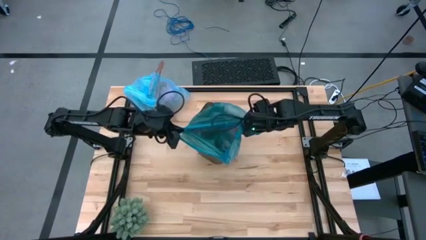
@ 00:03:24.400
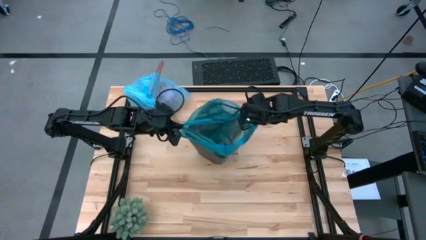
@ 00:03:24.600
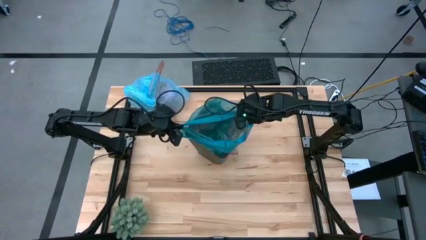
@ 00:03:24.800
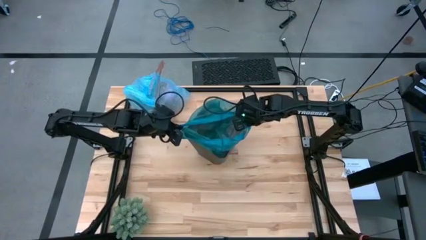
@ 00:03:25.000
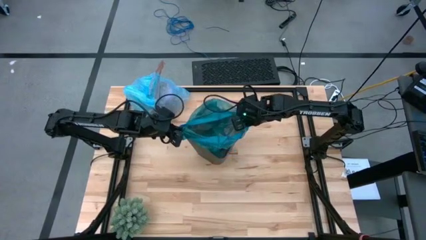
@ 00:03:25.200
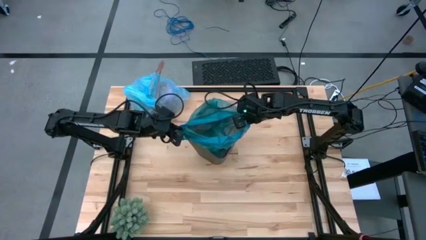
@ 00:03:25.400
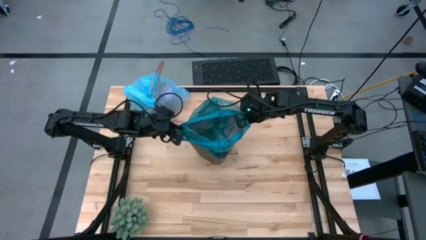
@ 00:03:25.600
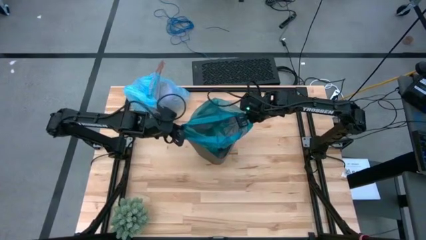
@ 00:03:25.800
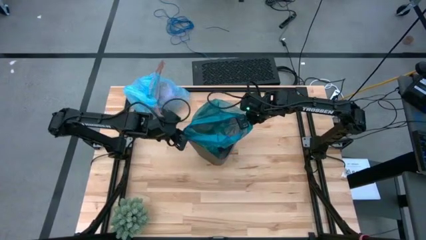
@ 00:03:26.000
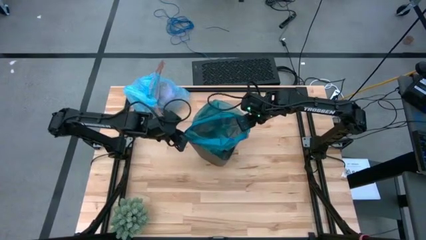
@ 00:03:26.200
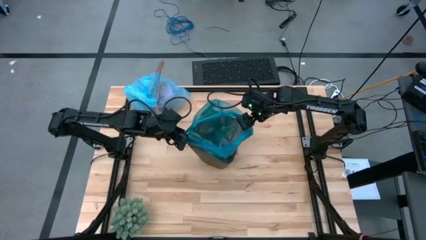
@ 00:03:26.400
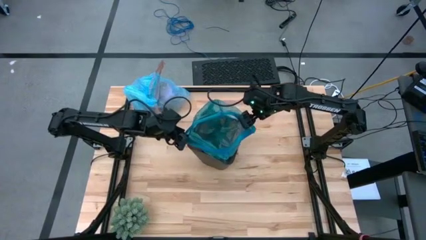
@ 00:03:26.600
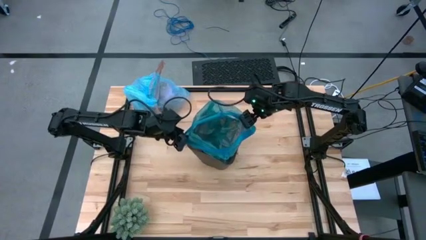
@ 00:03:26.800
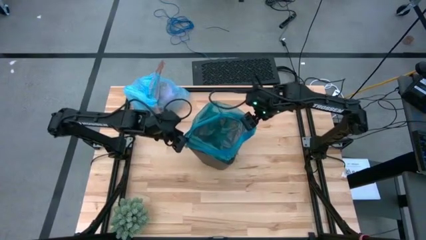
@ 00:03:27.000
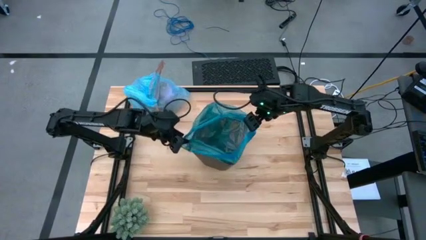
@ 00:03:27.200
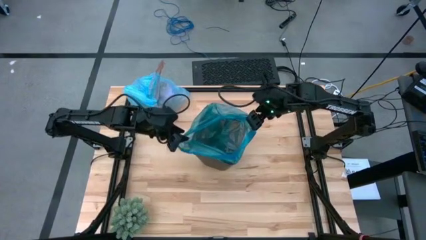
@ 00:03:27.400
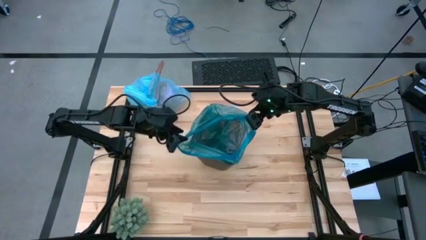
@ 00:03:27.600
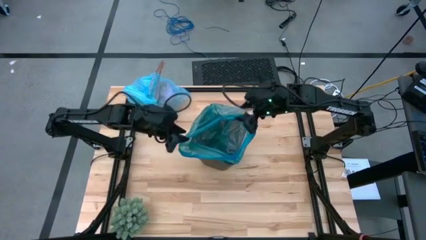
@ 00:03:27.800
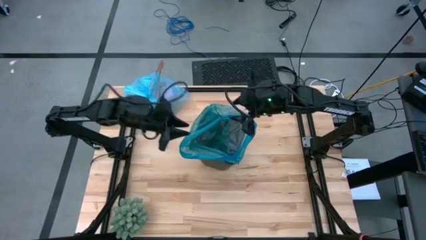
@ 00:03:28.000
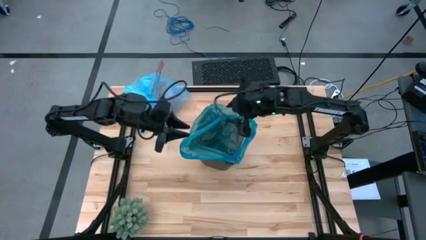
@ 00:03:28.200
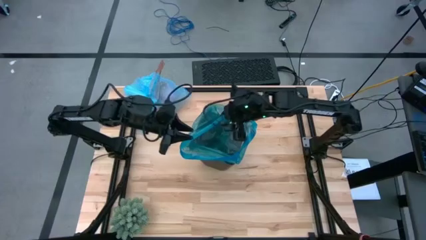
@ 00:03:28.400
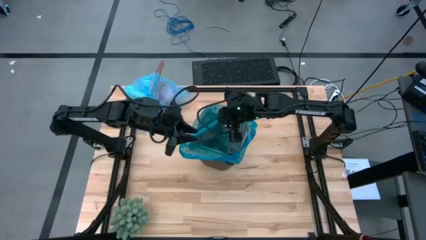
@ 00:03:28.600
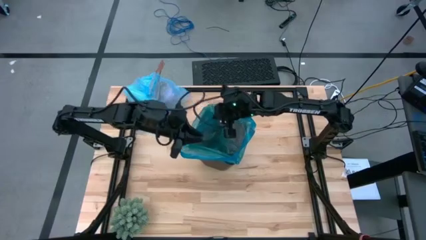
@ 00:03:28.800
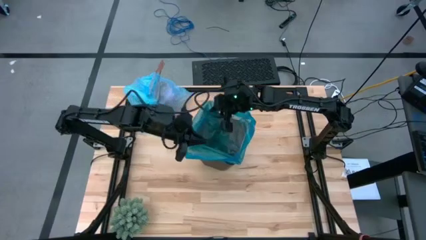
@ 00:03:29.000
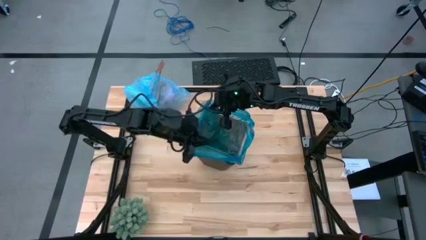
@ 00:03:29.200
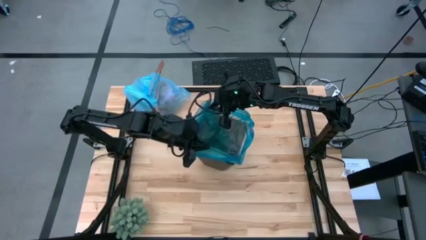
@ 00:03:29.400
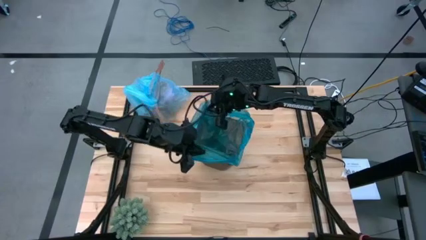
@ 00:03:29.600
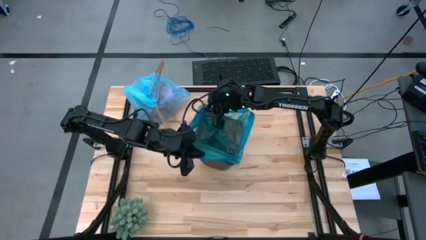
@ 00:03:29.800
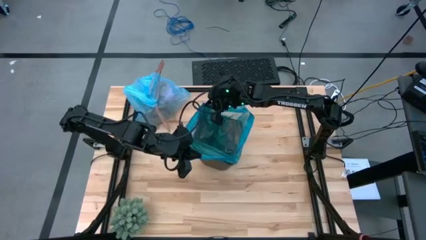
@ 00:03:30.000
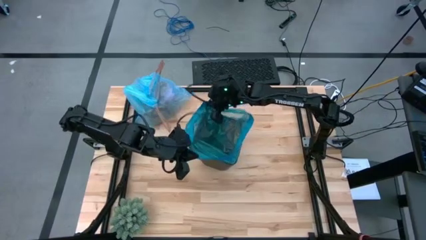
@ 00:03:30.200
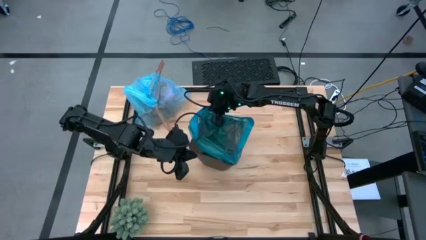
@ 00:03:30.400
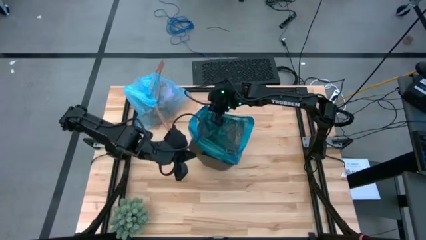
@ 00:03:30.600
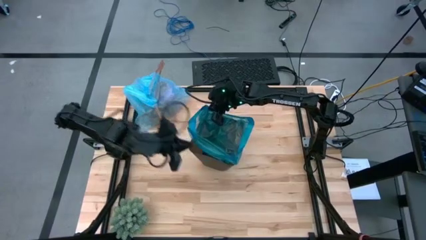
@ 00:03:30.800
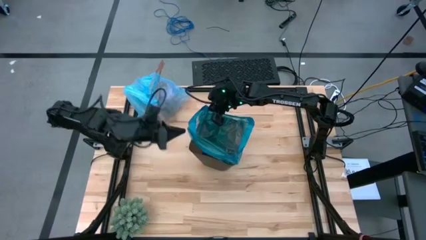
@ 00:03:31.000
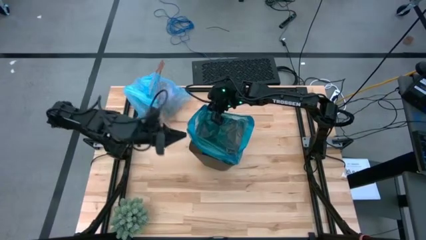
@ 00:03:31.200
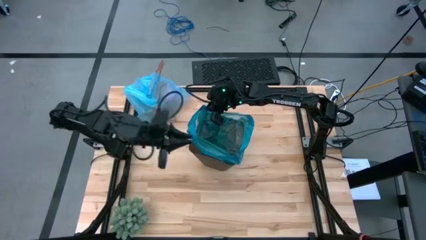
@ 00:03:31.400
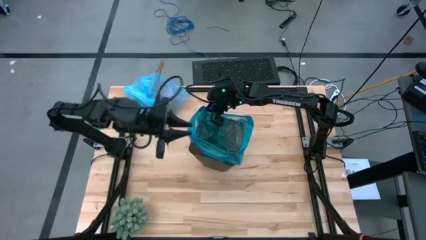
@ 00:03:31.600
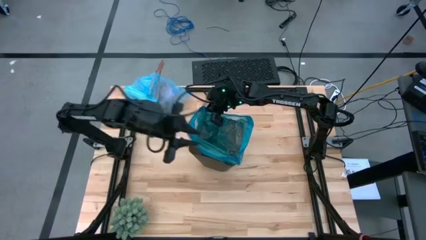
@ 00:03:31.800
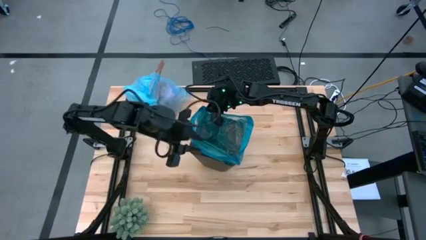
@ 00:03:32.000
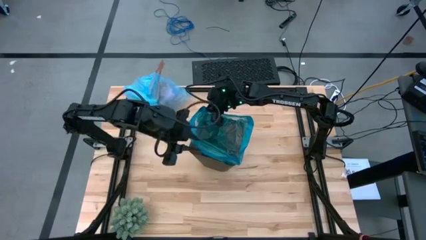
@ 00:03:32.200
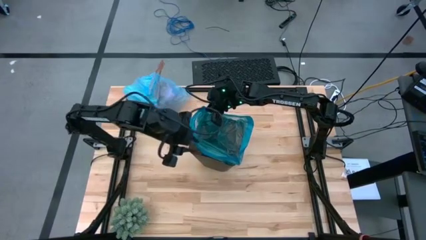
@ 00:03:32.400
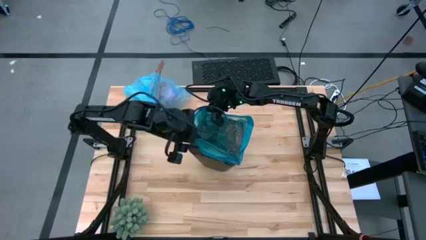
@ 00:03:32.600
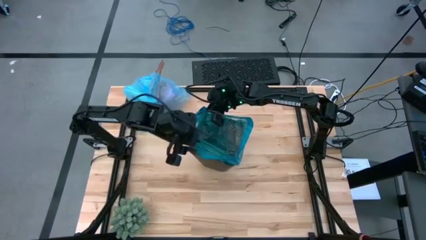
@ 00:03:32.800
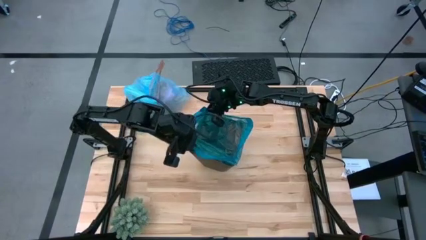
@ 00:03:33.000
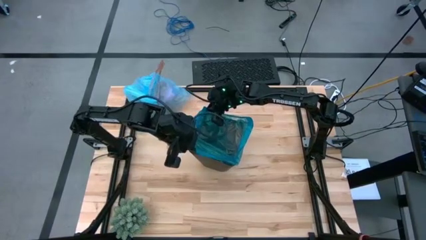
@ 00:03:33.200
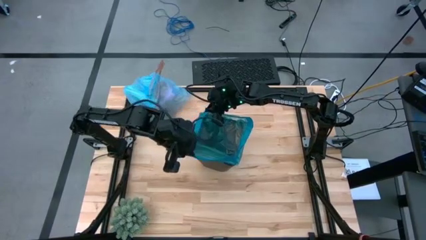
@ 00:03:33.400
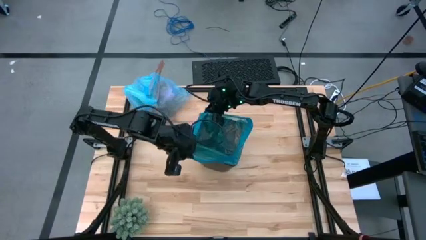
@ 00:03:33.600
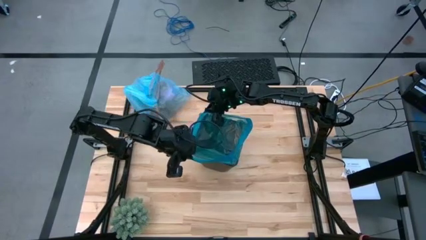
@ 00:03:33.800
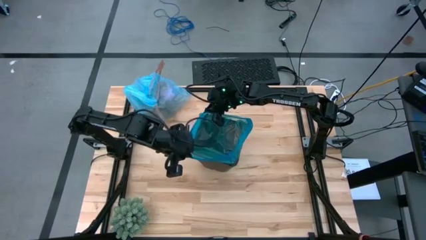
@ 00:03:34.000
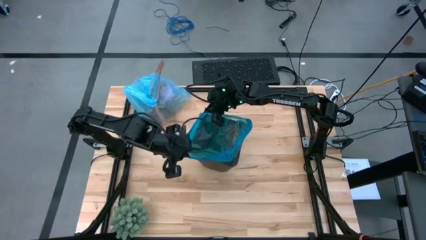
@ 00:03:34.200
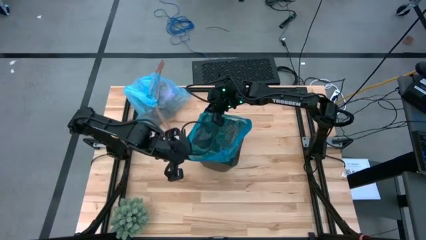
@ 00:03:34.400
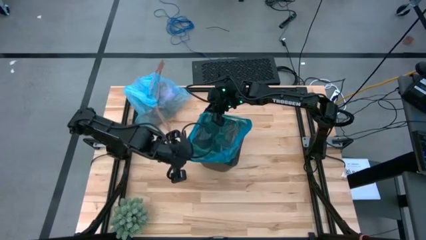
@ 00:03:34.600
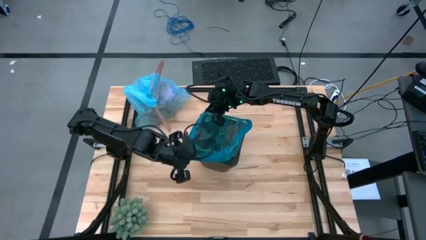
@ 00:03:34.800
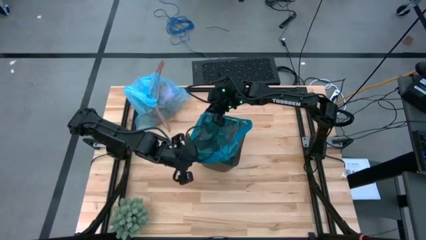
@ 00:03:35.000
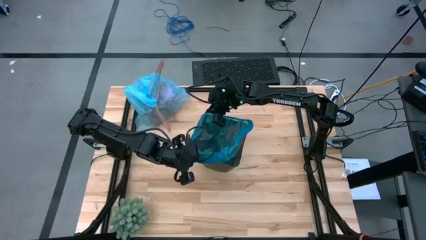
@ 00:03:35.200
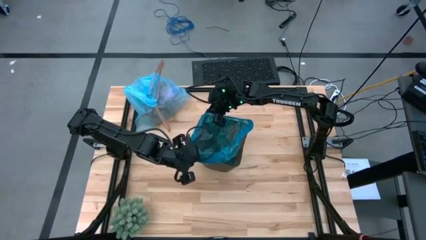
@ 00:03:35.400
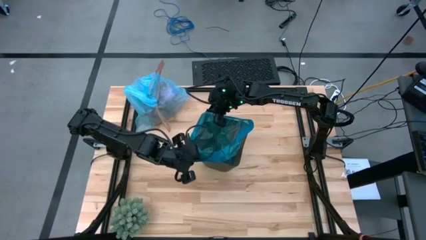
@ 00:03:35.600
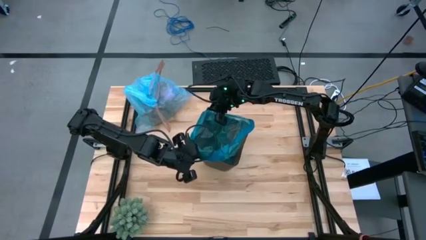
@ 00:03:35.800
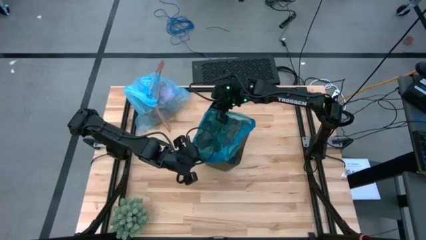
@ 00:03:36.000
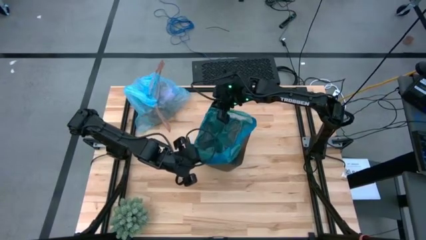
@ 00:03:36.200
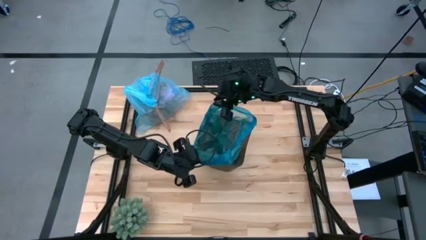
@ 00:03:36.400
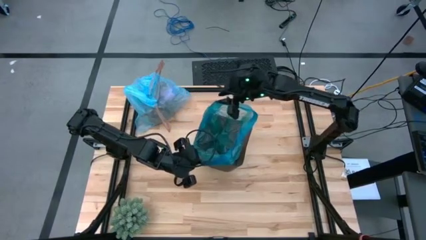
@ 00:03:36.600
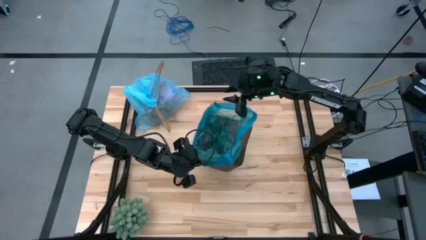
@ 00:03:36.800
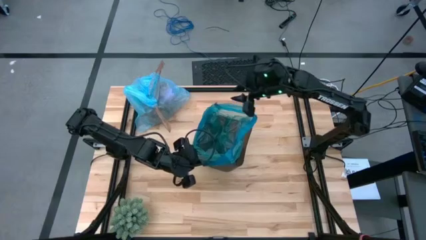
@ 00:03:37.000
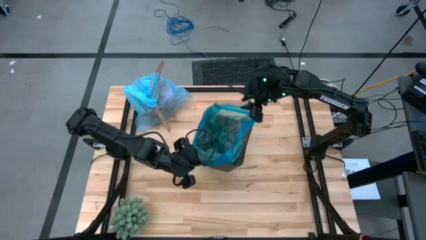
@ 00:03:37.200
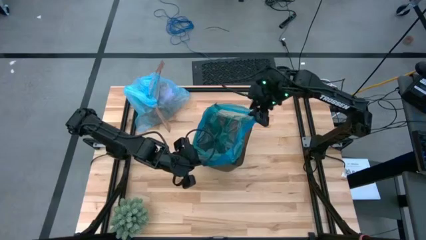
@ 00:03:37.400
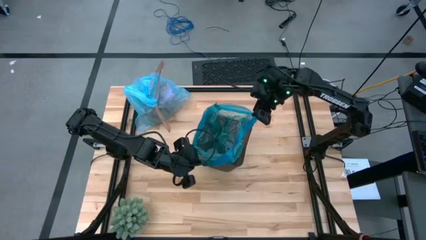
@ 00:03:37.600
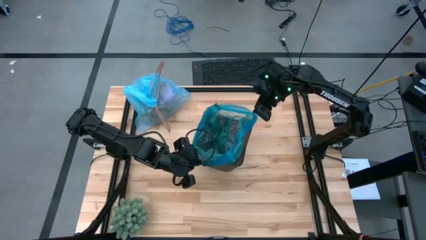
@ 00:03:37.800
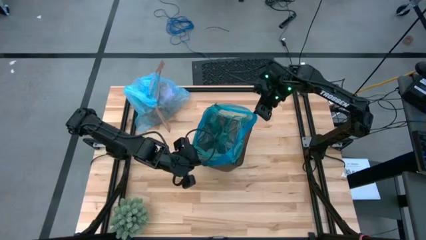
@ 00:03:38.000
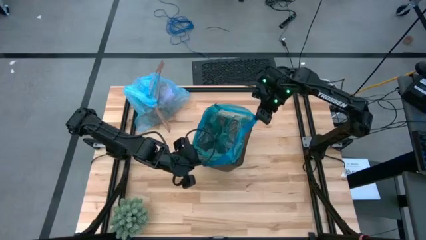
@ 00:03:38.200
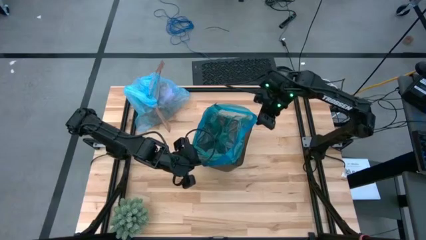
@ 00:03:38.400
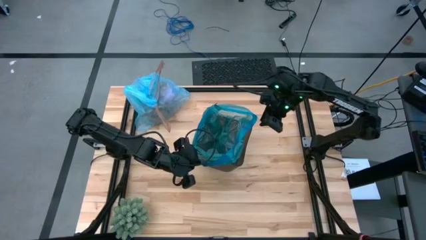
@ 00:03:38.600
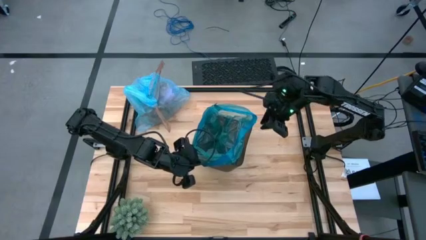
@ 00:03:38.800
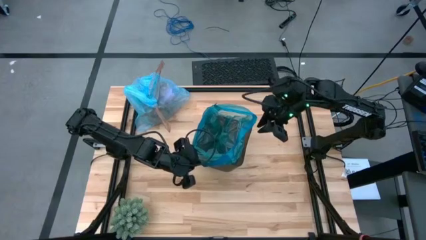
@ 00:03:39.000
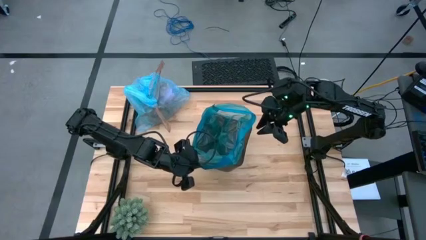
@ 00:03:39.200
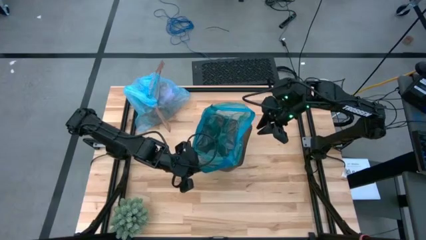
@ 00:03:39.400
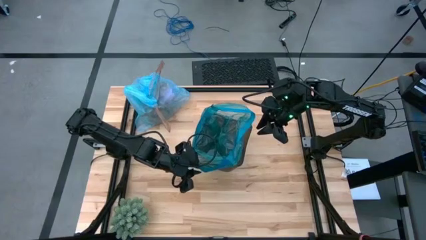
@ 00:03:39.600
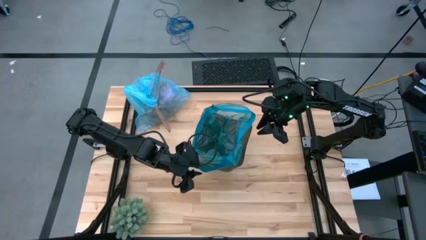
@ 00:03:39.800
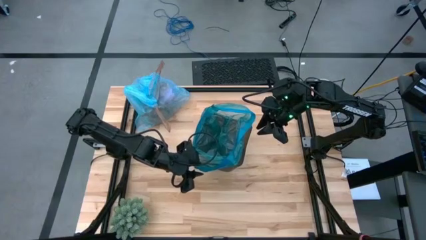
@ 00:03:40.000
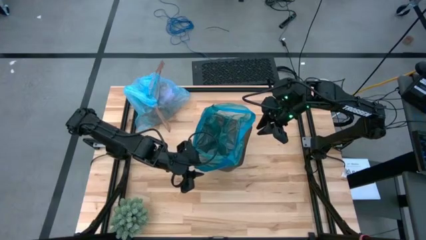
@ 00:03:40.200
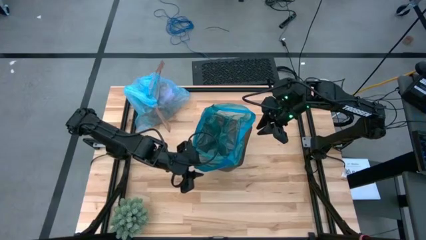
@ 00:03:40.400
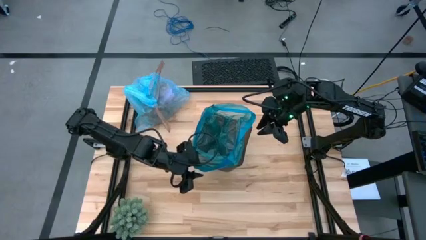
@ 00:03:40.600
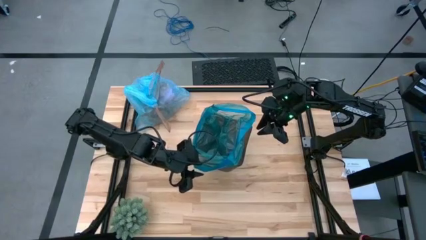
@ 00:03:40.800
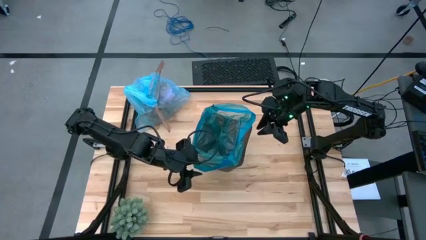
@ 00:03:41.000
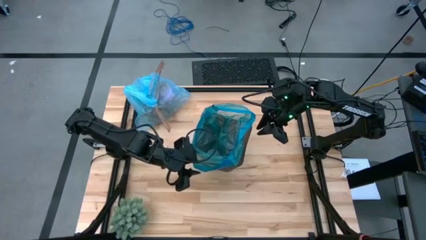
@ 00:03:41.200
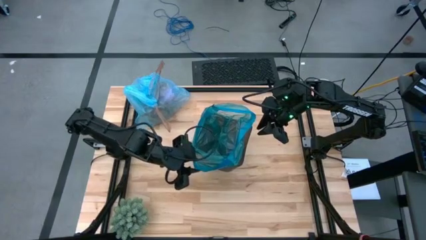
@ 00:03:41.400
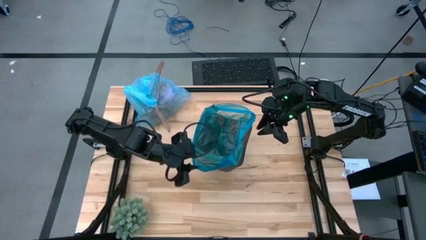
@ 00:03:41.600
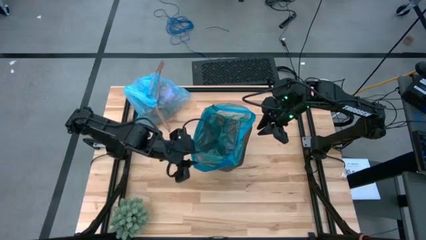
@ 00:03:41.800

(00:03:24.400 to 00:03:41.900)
Task: place trash/remove bag and relplace
Insert the blue trash bag into the black trash bin
